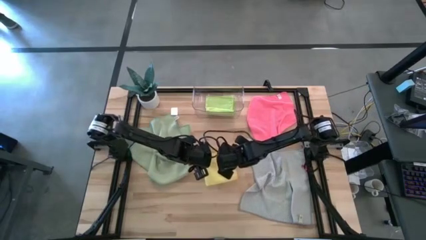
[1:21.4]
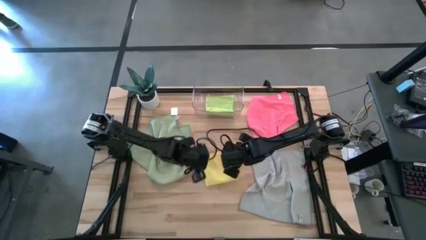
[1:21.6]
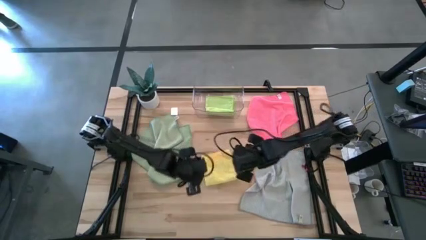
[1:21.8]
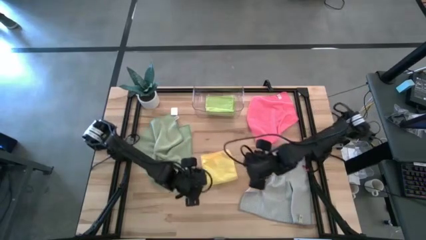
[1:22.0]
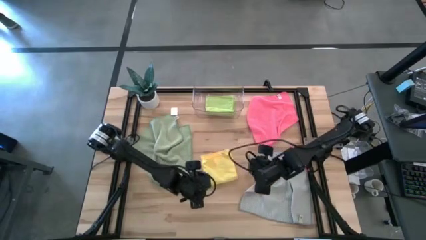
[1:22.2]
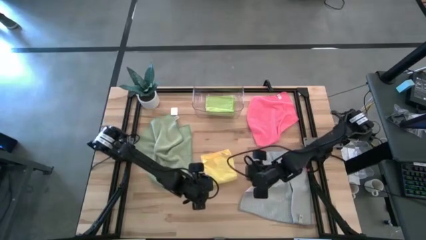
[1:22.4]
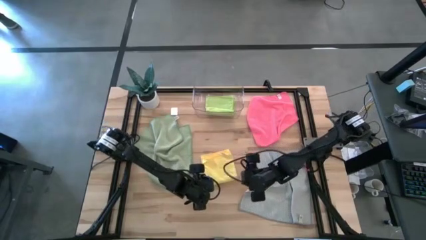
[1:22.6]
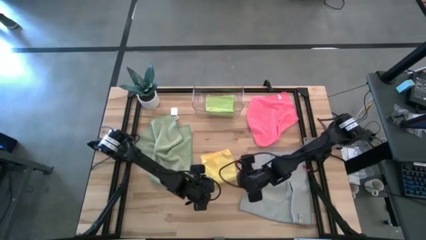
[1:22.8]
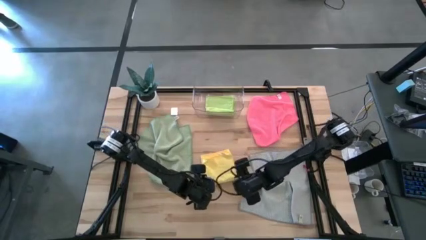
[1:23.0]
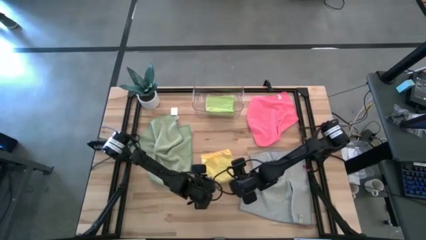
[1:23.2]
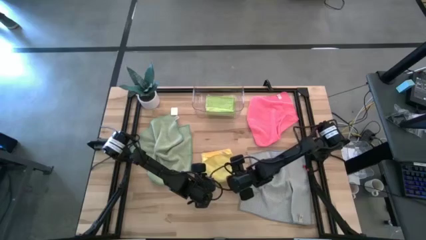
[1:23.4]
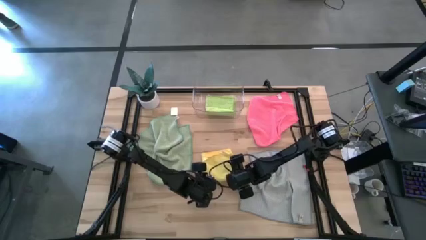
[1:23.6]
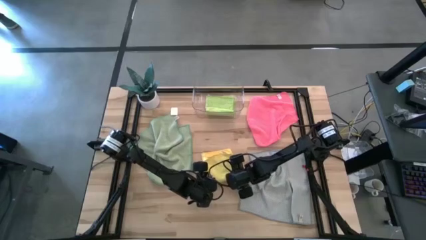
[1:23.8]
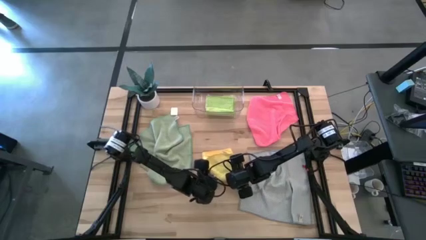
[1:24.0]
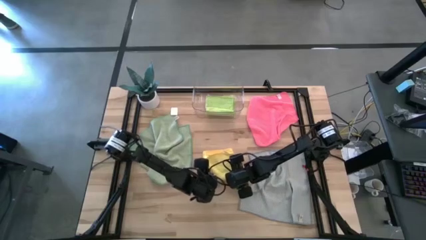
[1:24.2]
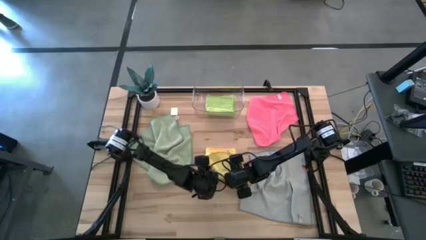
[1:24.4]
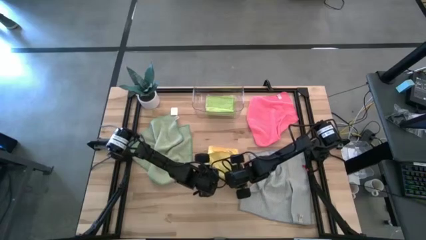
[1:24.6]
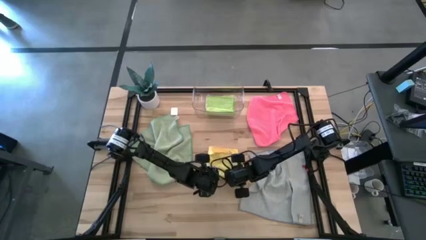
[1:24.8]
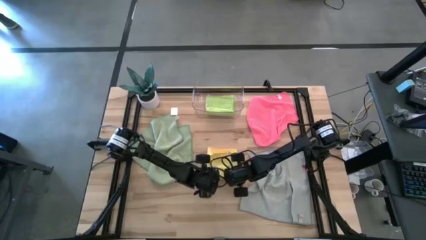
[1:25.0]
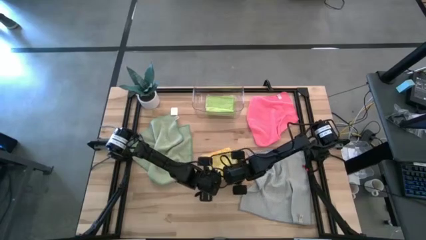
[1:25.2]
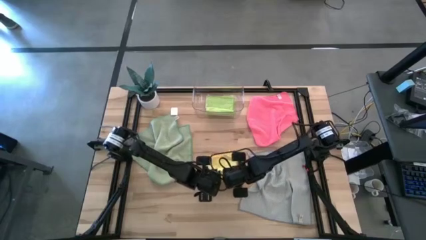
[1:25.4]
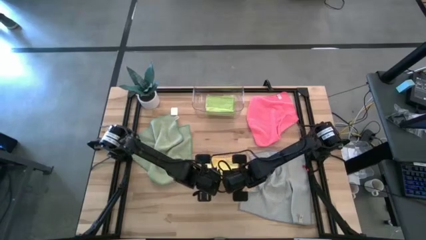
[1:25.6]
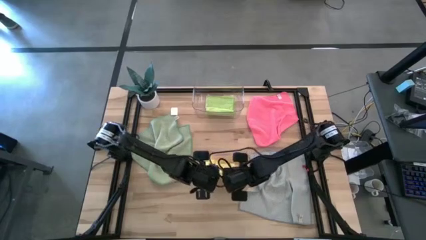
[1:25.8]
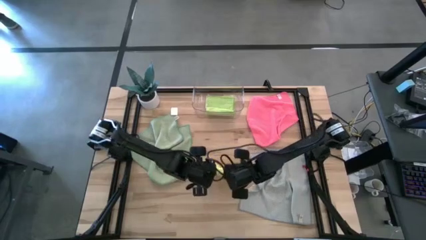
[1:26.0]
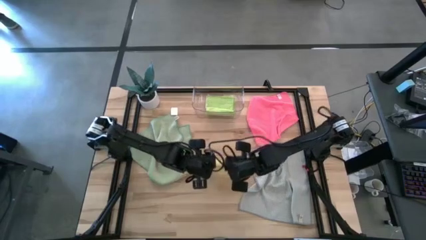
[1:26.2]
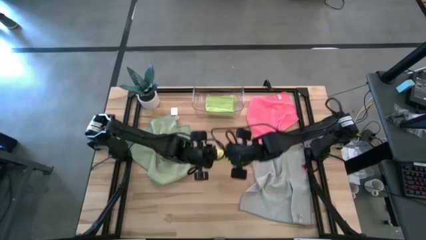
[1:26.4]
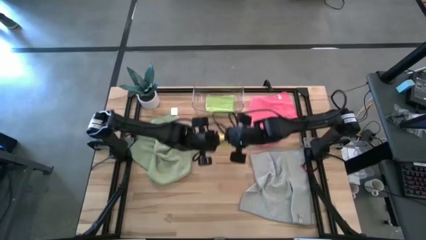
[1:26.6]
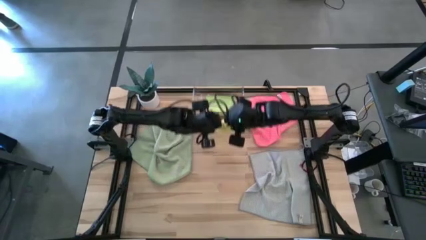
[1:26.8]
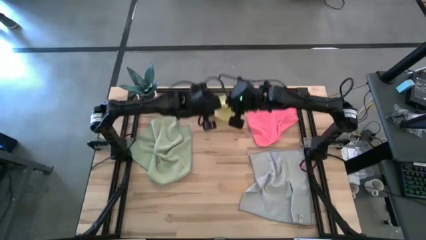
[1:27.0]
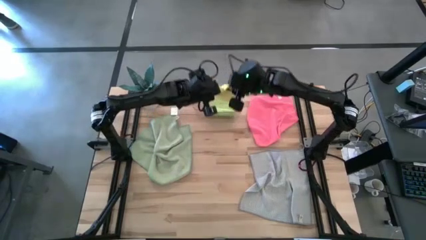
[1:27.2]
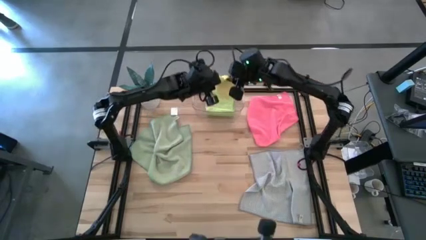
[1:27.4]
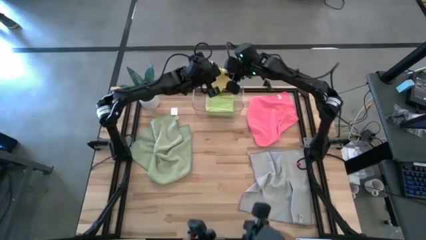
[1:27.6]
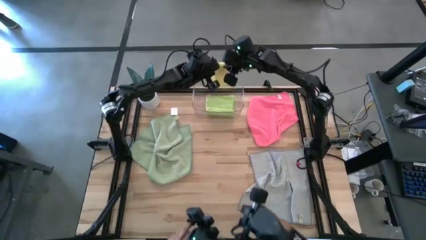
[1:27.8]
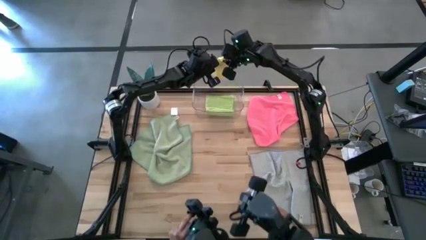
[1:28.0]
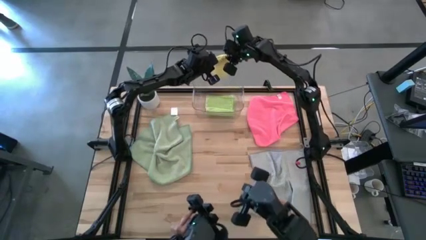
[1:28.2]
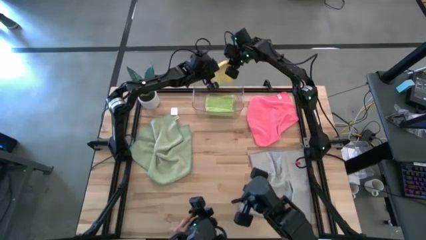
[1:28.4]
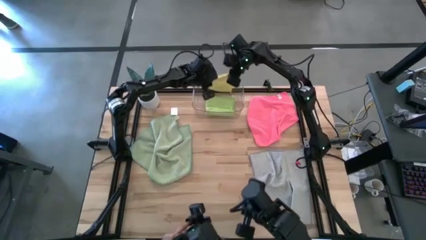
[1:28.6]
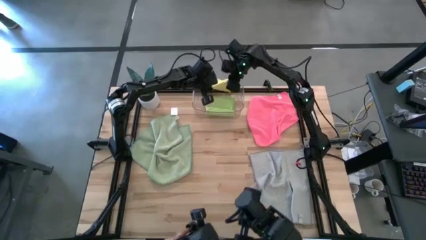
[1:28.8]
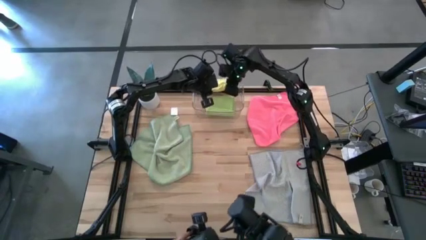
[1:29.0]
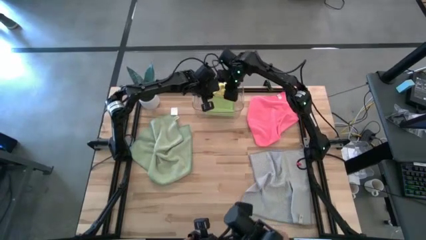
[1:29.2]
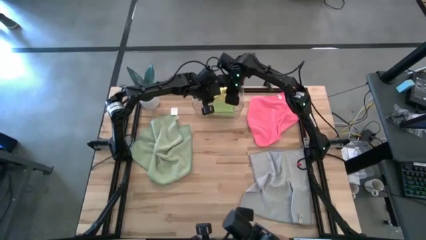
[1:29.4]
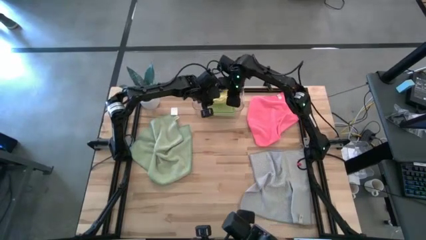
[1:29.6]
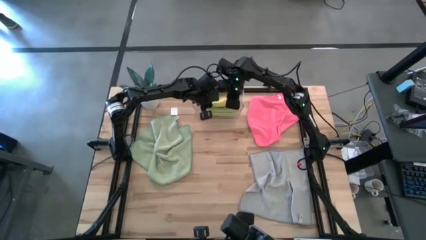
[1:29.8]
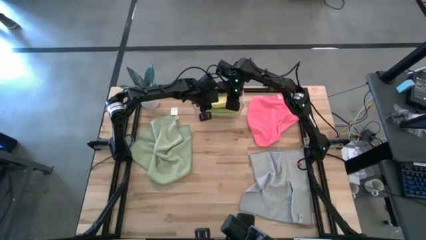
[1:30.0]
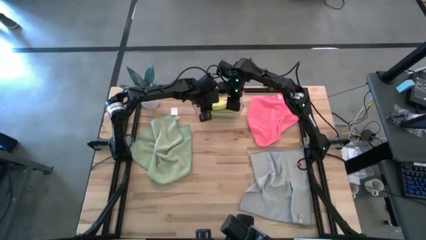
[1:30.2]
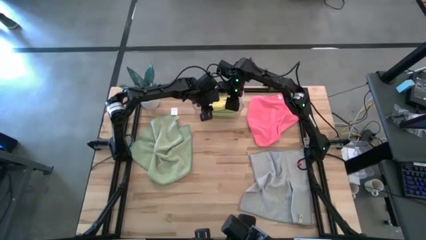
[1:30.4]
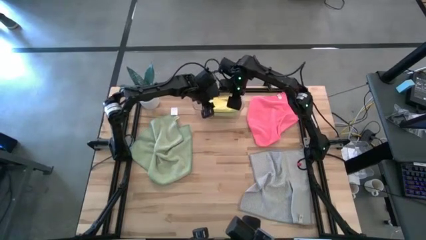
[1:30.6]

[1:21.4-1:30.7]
Task: Fold microfiber towels
Put the folded yellow microfiber cloth into the transparent bin

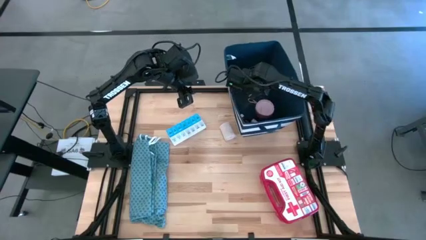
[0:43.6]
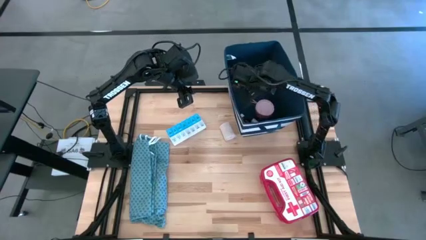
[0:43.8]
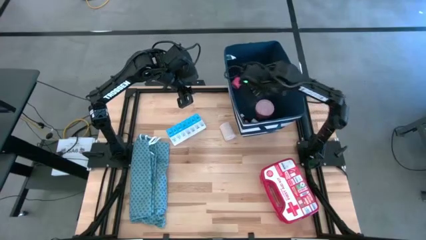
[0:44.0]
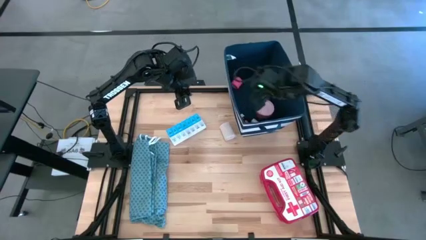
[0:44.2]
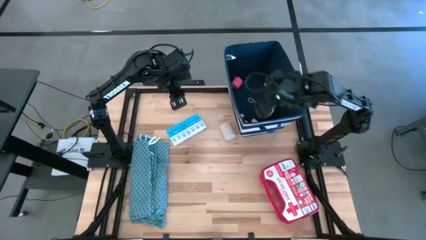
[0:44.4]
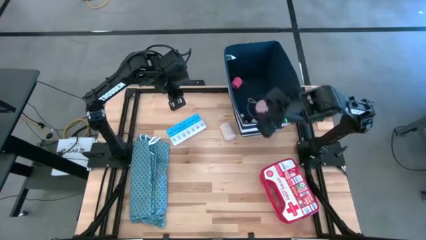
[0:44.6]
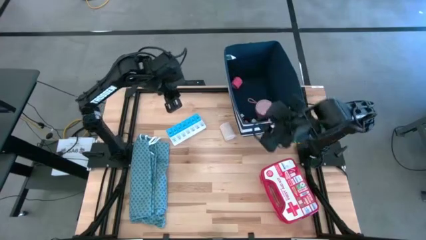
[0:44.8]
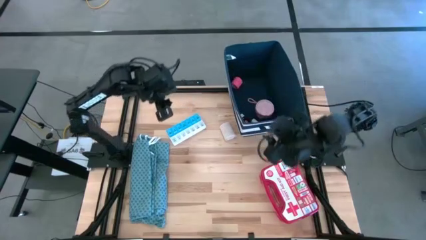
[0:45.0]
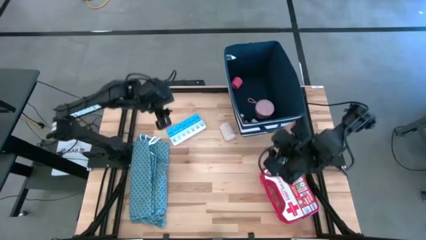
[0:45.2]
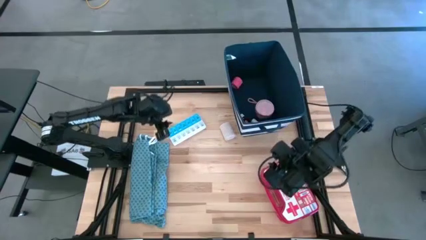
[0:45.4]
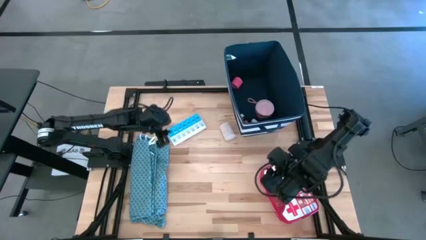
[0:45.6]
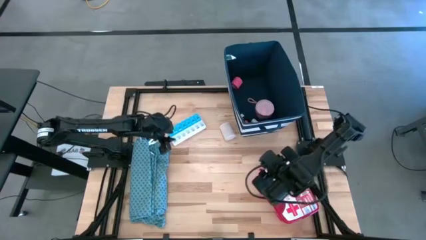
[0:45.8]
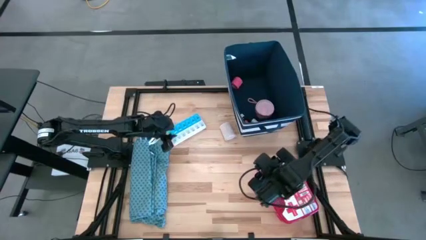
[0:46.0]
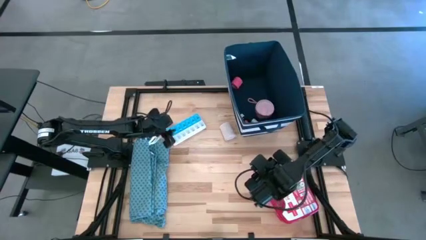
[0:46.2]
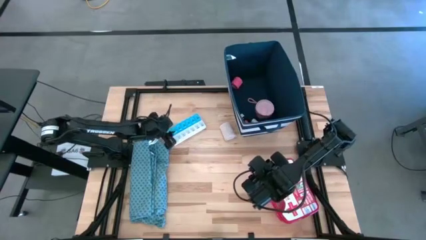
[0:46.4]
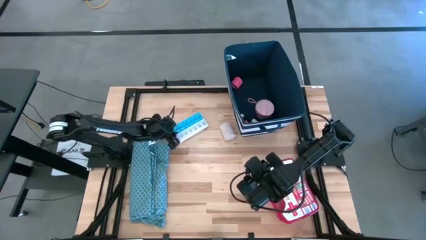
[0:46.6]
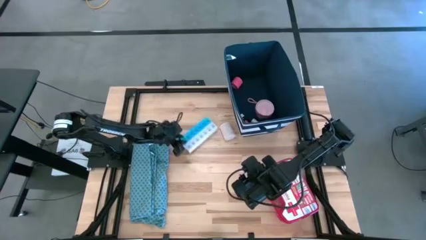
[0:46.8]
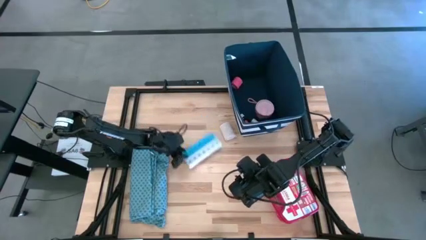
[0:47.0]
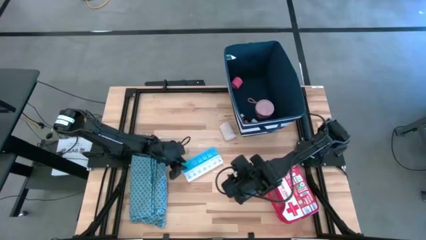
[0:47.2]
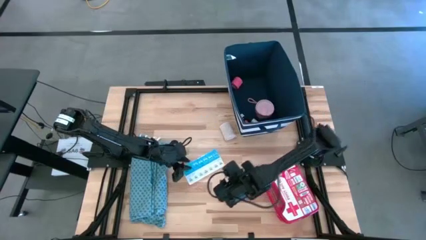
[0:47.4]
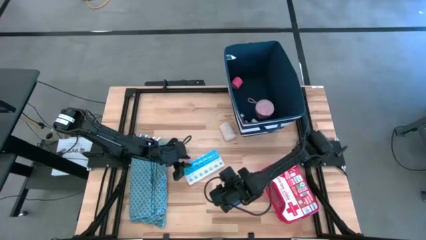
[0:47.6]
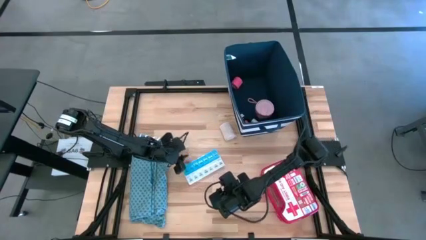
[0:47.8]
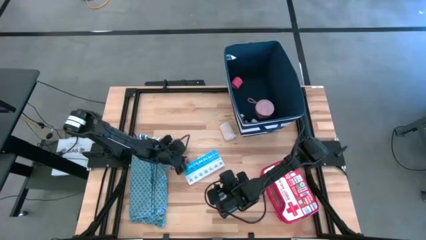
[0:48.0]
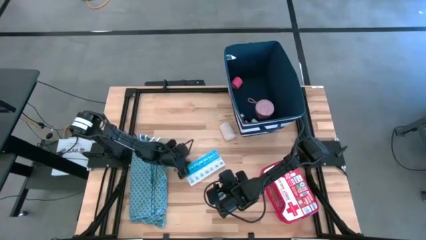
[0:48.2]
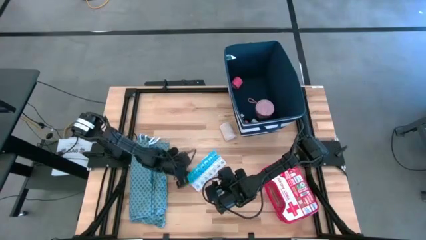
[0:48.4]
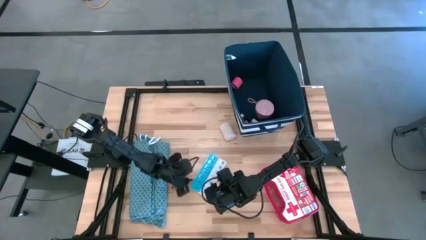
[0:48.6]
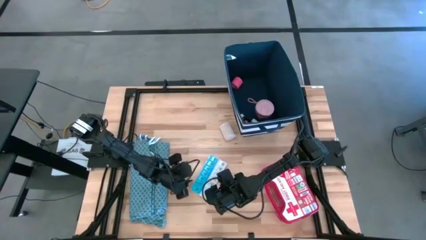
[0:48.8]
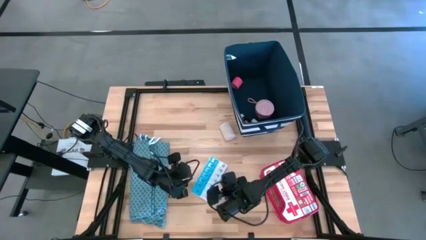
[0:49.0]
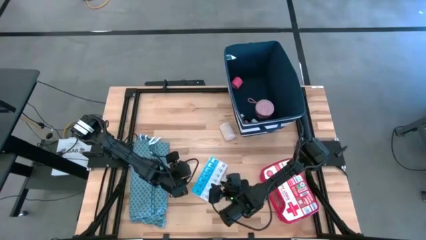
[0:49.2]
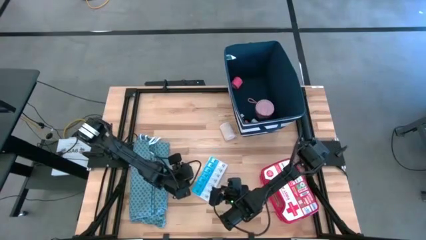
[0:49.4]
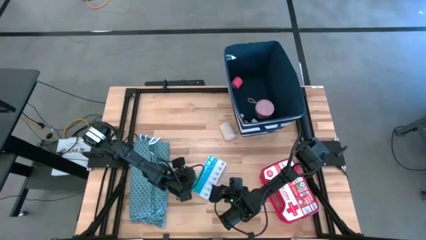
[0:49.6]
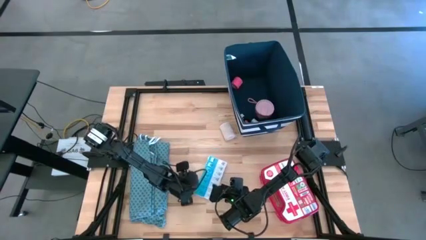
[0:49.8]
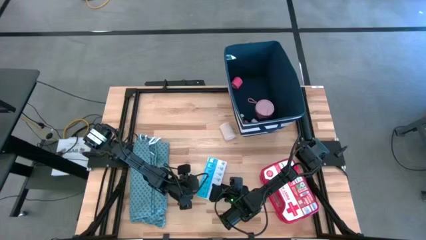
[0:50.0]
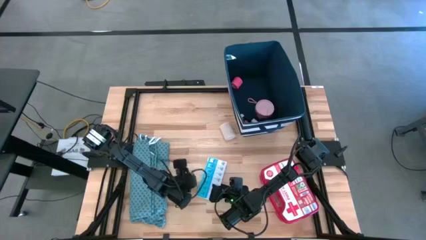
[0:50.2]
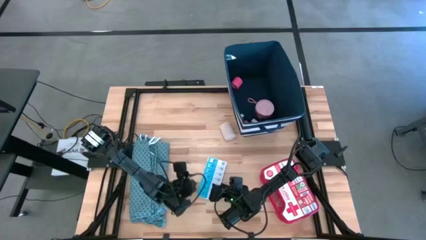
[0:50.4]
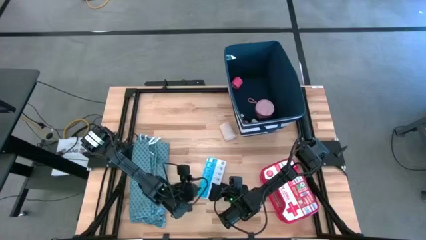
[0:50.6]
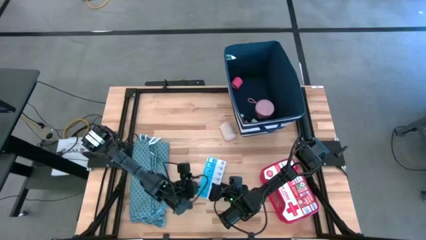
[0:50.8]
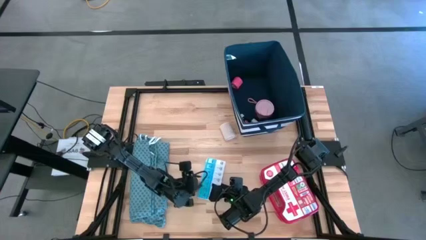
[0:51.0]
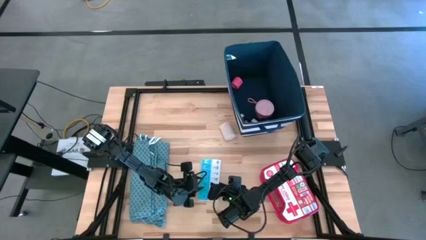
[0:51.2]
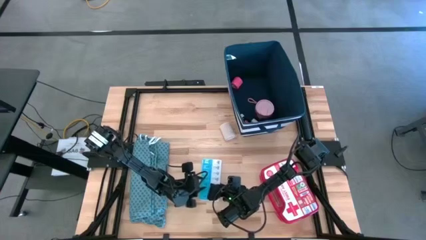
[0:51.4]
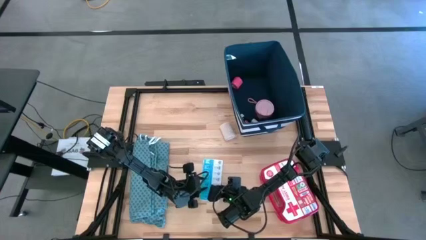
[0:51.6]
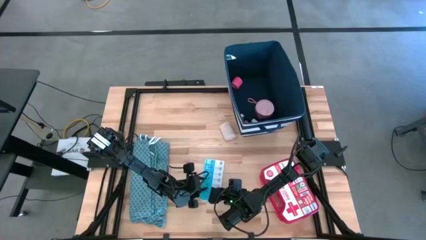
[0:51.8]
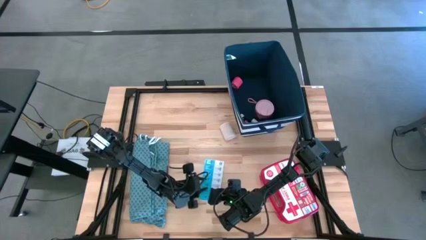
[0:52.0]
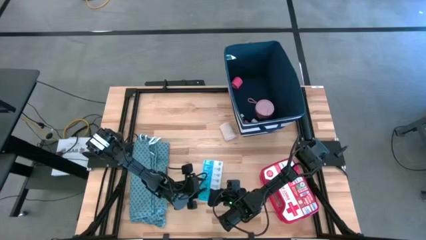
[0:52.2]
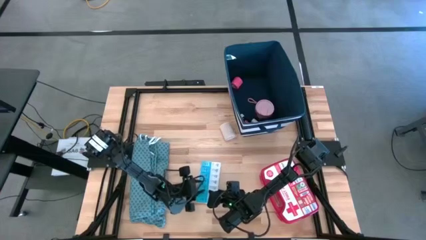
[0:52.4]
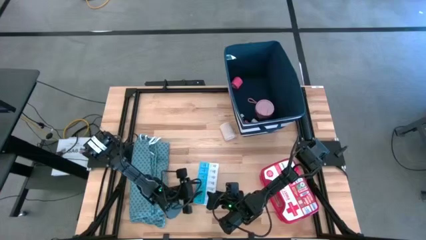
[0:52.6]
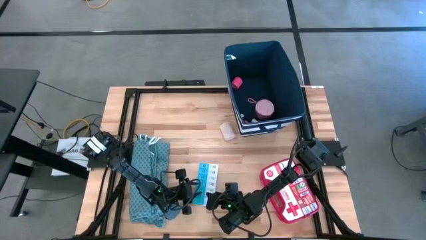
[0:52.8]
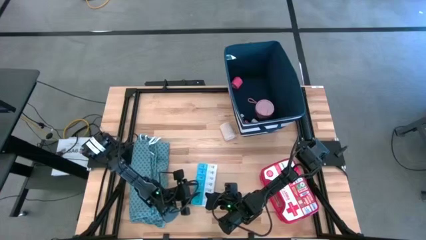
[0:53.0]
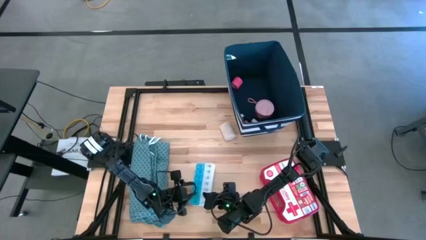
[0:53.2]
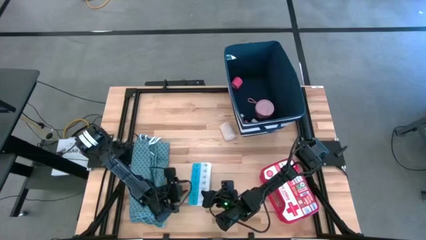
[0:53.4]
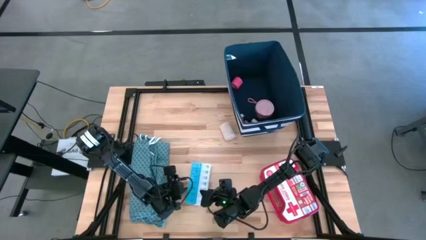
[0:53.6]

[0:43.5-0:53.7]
Task: Pick & place medical supplies in basket/bin
Put the white and blue medicine organizer into the blue bin
